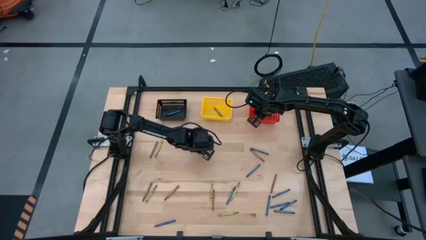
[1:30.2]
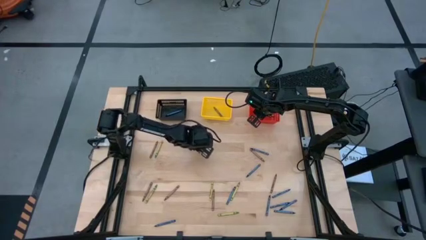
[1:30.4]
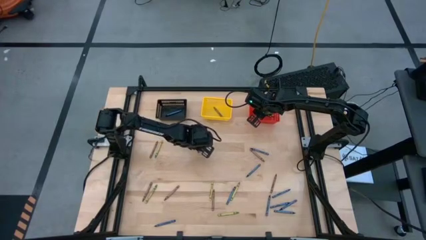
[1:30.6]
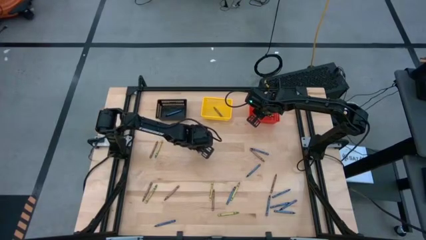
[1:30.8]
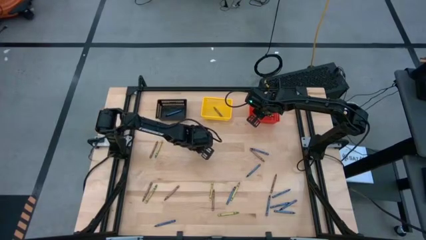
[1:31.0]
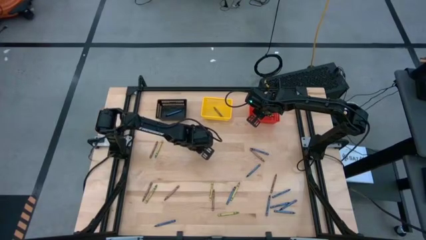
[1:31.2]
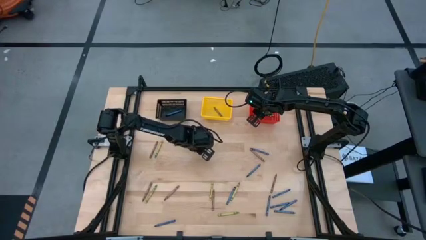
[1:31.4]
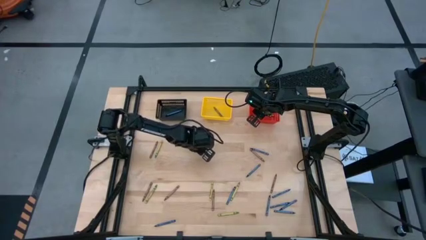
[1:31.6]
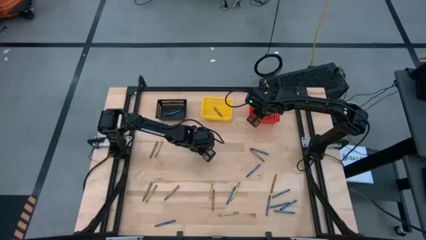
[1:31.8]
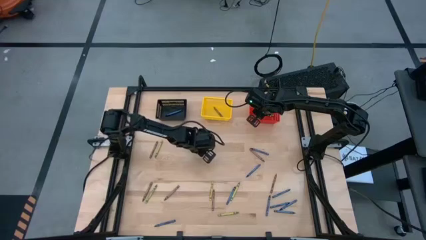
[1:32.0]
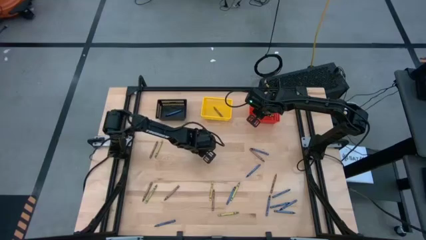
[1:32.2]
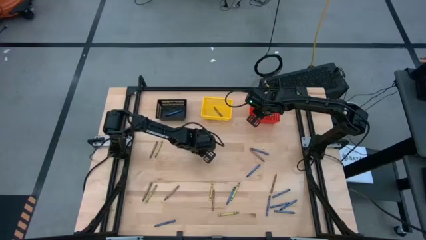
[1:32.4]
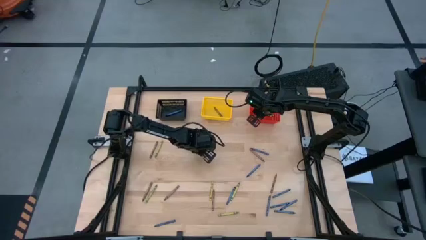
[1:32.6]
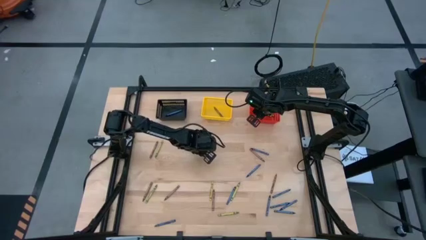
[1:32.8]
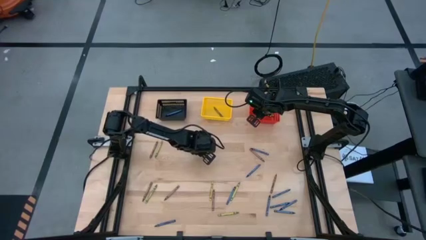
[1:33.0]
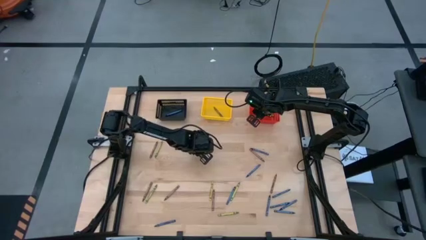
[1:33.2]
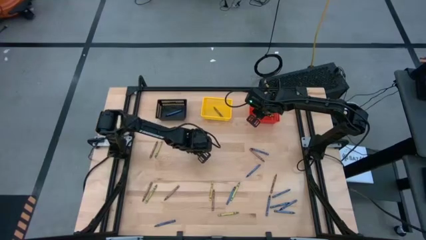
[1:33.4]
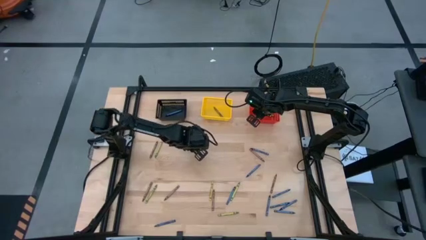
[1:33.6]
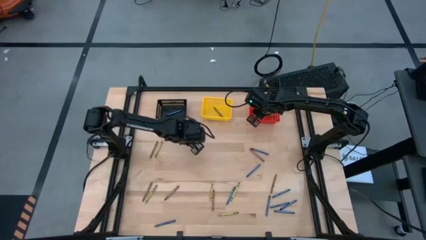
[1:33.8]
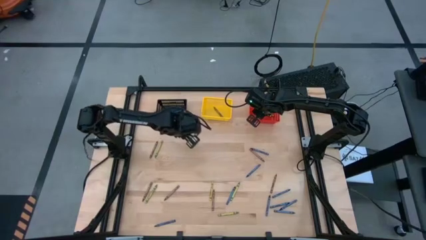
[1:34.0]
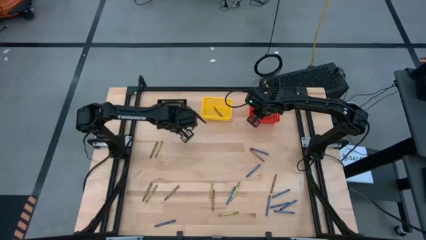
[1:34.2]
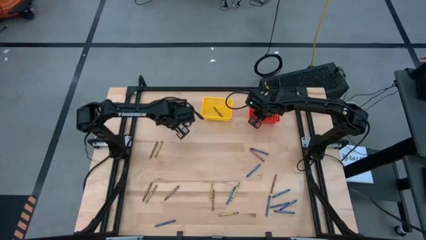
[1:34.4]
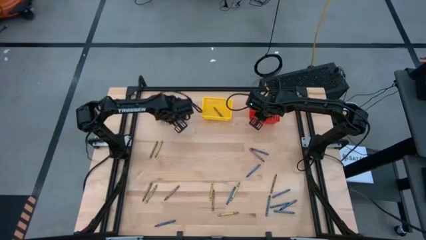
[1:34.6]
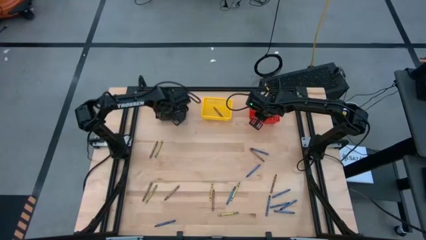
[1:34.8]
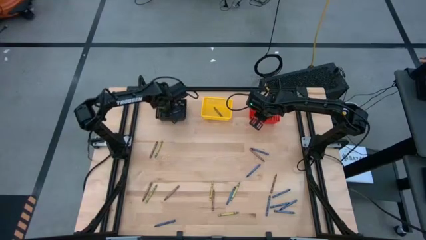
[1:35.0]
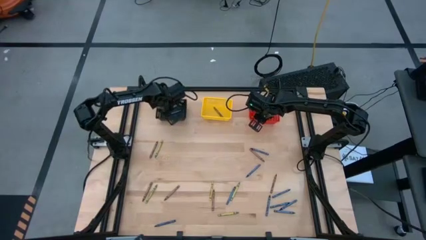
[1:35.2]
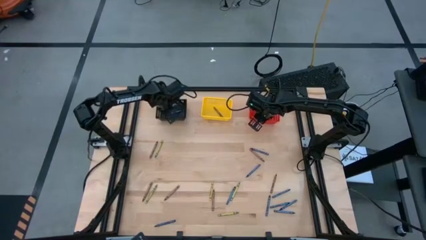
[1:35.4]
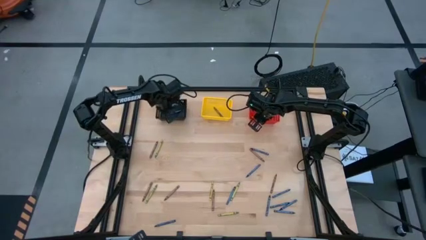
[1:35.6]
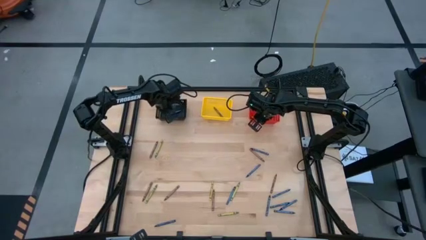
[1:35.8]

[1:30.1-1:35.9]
Task: Sort crayons
Put the blue crayon into the black bin

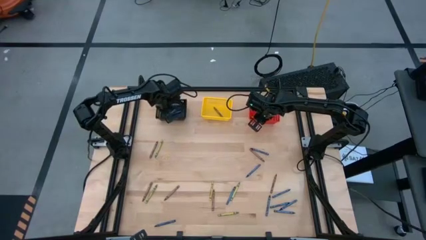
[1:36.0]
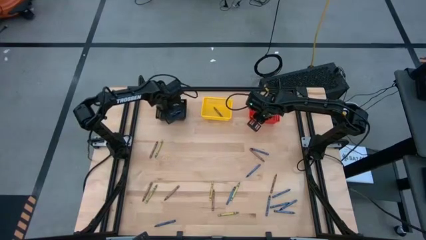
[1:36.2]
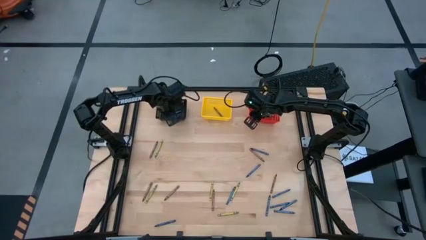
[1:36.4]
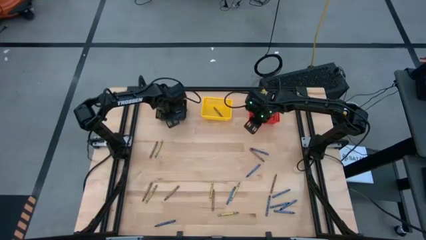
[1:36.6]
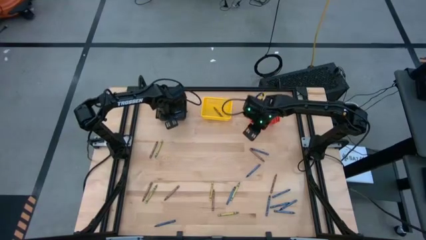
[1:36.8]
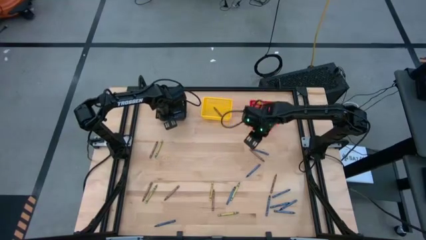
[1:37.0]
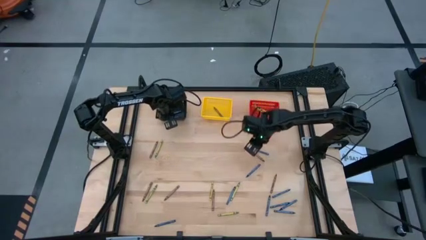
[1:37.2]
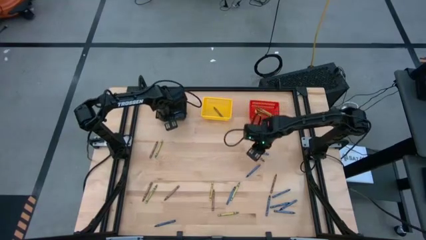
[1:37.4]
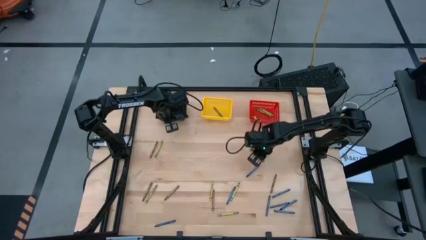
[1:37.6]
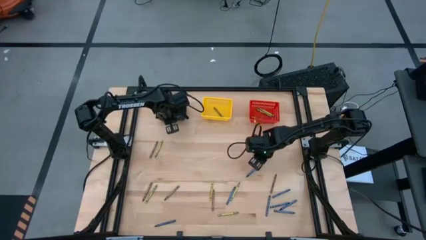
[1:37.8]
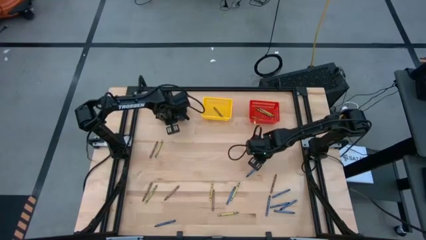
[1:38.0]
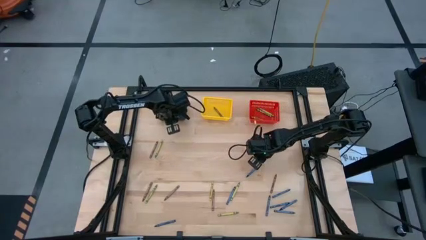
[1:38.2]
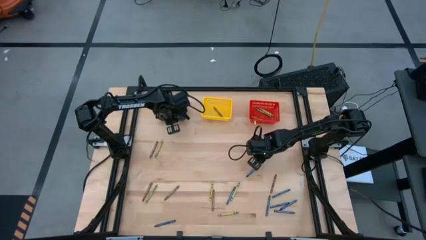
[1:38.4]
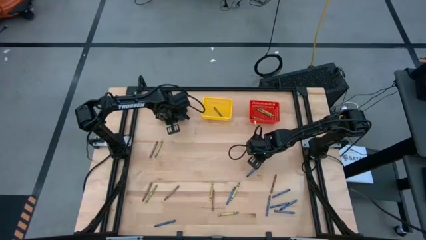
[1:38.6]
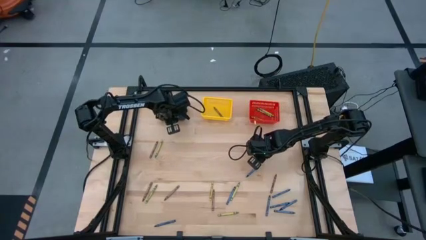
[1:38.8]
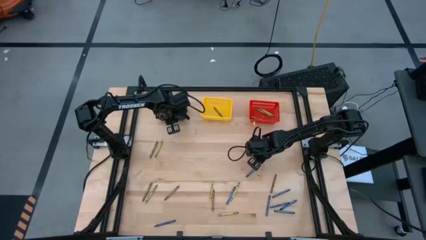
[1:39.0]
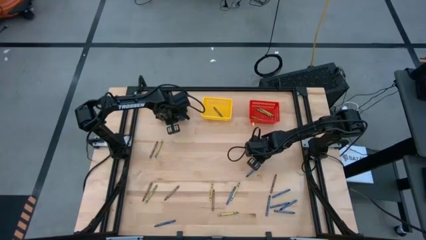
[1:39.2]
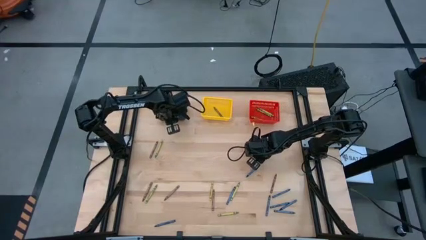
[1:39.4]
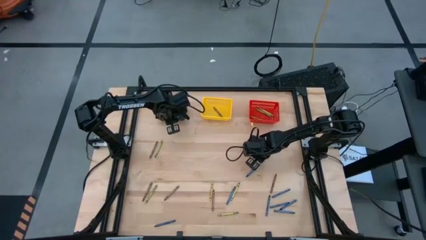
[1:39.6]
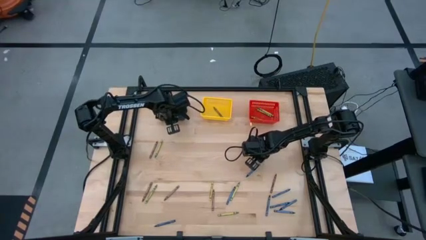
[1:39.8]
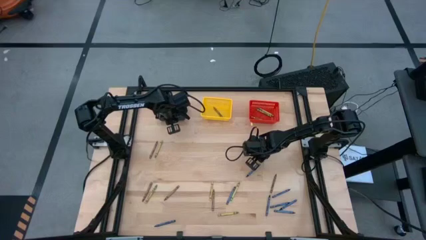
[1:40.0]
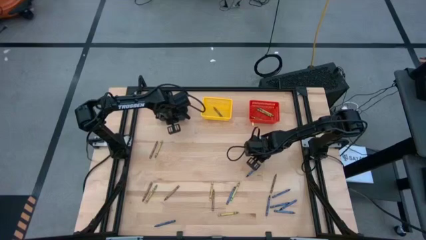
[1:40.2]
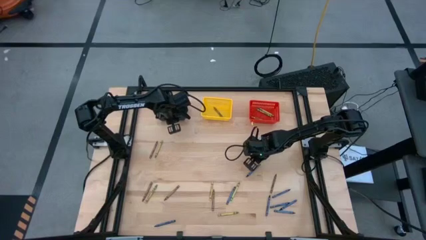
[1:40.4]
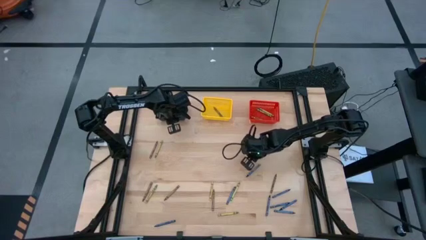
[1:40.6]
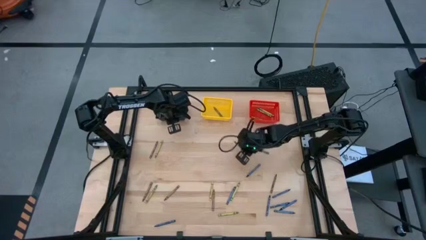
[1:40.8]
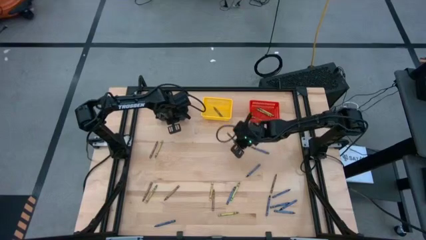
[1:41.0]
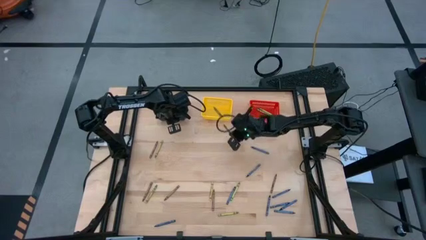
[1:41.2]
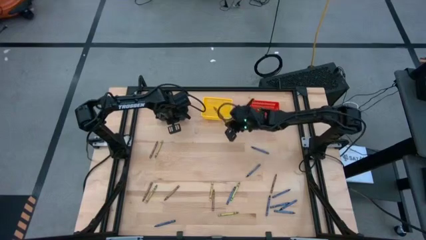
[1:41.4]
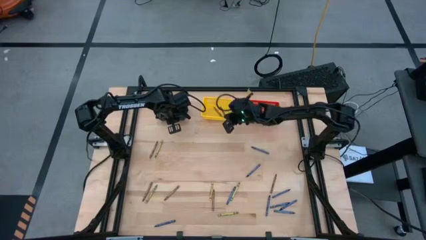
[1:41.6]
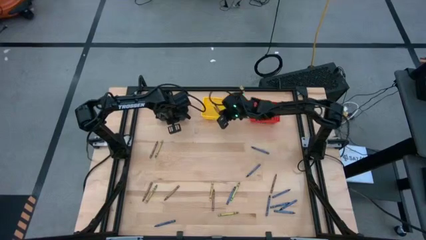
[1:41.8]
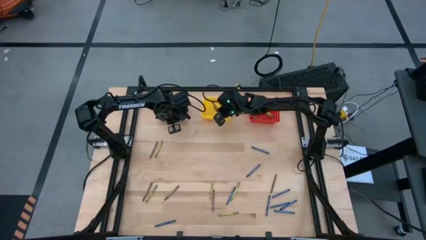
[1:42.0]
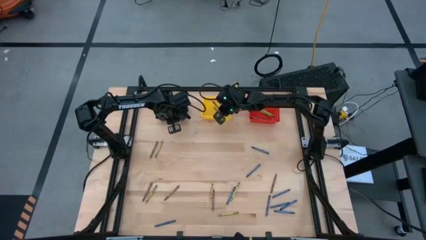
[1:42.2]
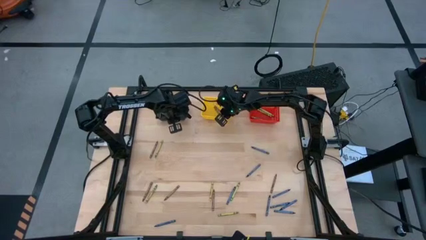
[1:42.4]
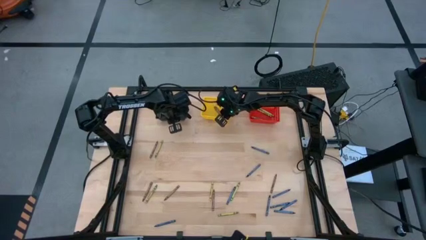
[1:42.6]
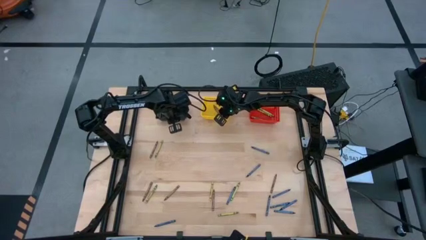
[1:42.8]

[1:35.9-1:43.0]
Put the brown crayon into the yellow bin

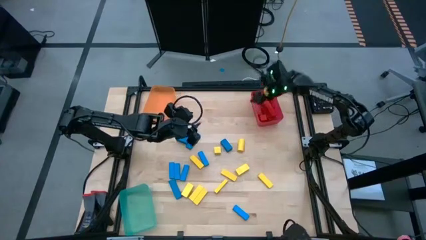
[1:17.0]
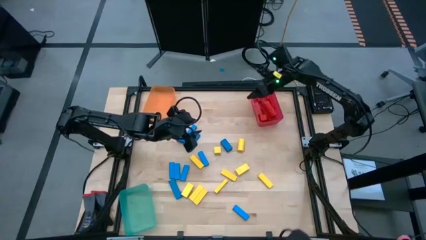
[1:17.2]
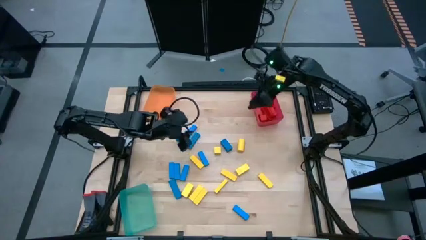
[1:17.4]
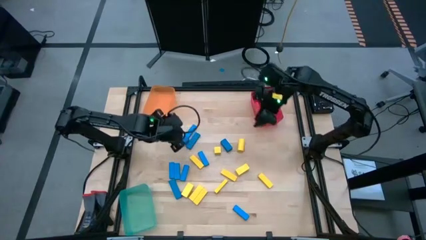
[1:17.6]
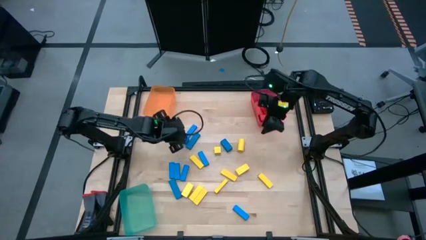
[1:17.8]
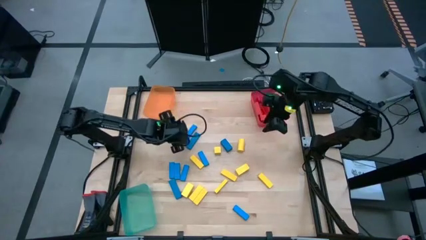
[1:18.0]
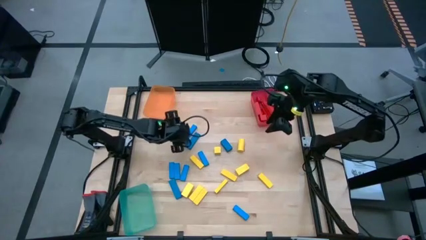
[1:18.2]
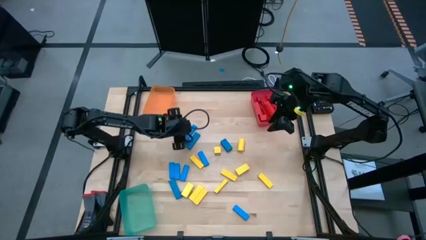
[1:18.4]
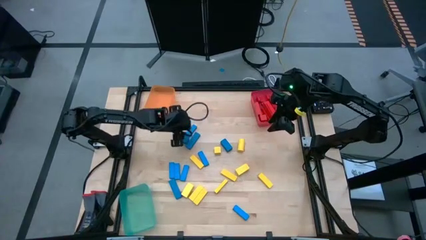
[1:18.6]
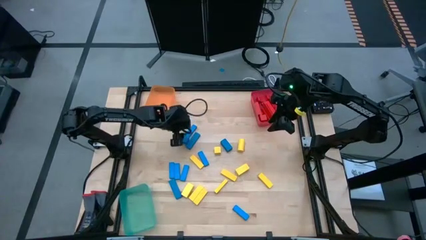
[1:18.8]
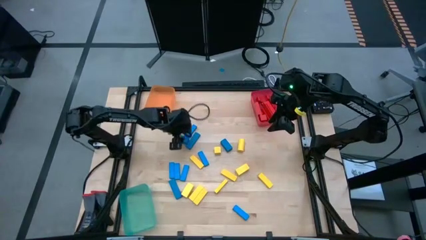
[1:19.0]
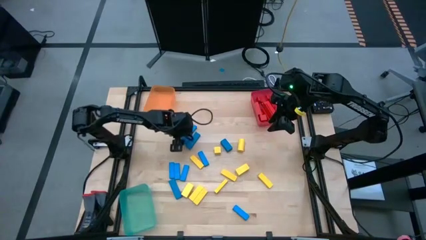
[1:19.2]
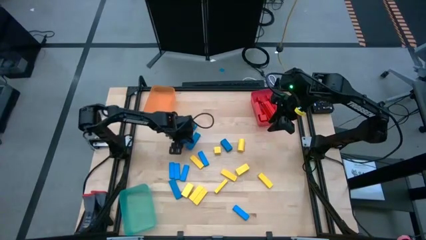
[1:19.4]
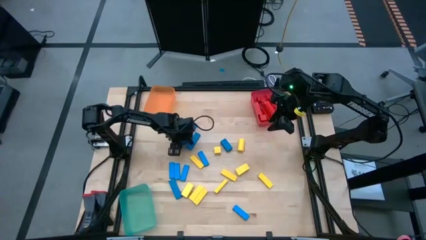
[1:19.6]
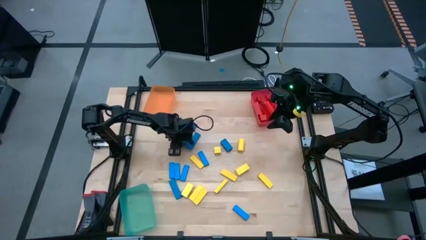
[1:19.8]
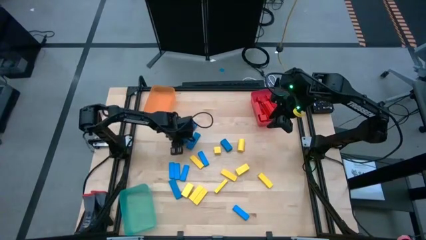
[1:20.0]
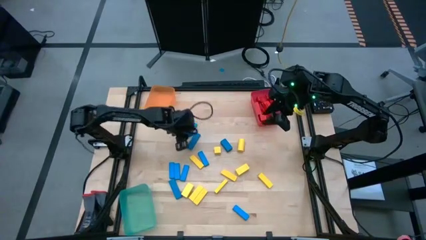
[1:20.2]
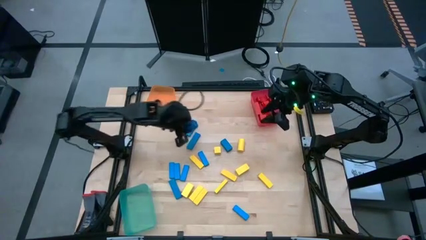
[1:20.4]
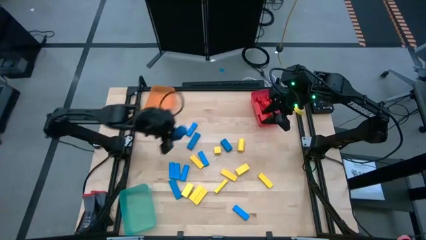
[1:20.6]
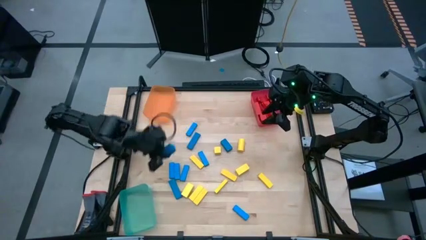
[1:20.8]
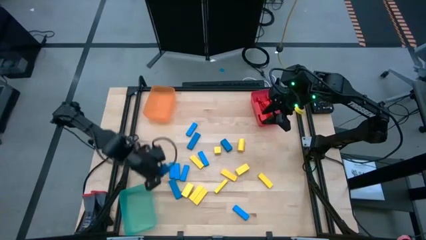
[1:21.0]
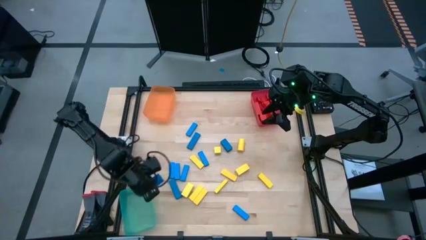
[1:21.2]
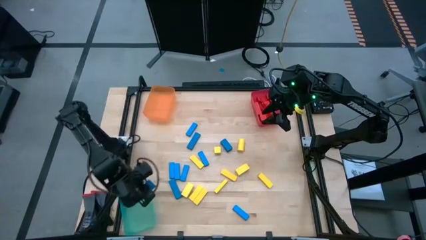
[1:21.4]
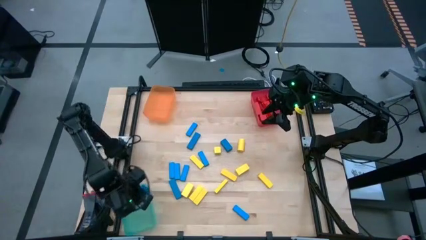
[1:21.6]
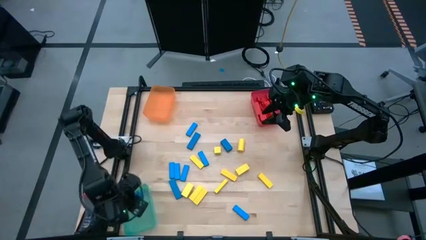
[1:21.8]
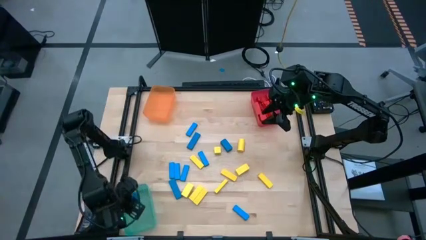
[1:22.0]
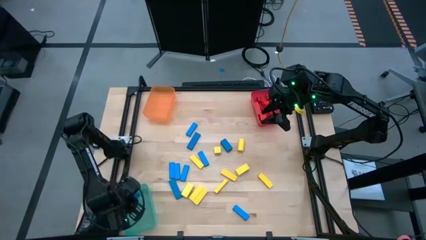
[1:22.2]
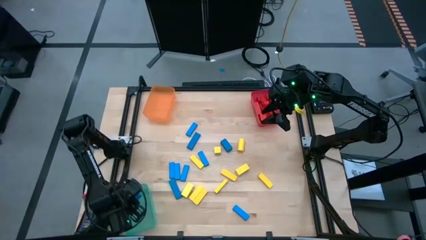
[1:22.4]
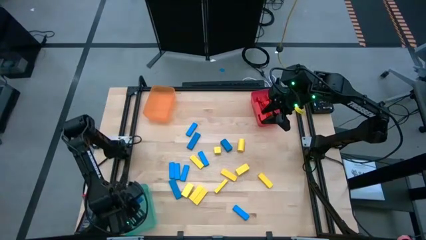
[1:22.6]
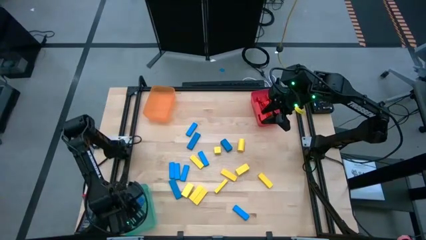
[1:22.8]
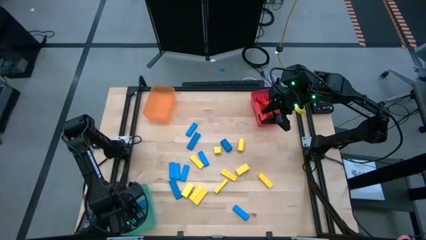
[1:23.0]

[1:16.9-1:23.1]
Task: Sort blocks
Put the blue block into the green transparent bin
